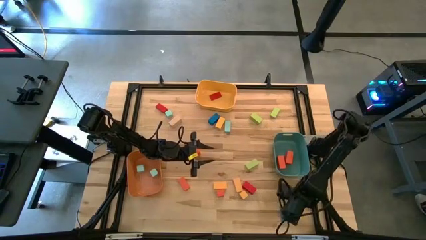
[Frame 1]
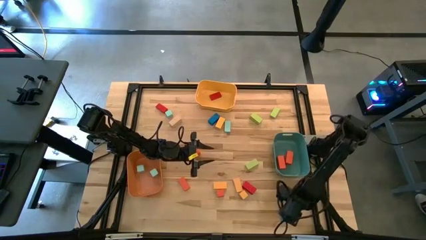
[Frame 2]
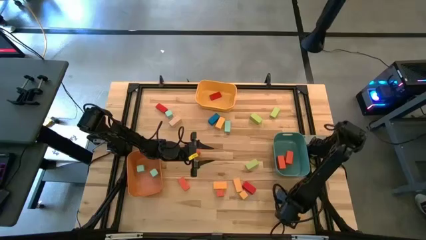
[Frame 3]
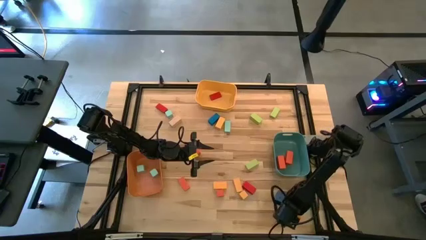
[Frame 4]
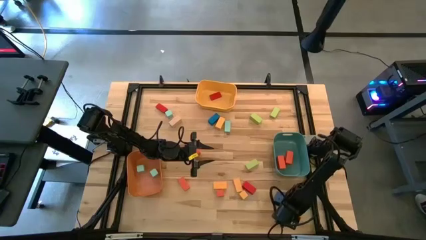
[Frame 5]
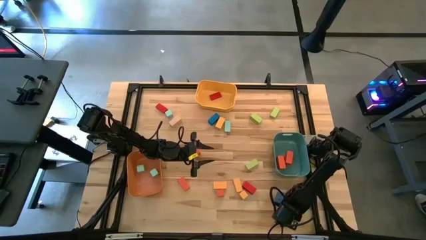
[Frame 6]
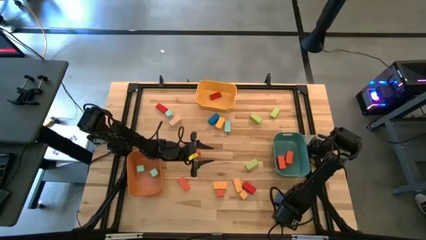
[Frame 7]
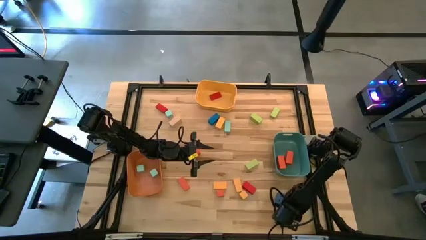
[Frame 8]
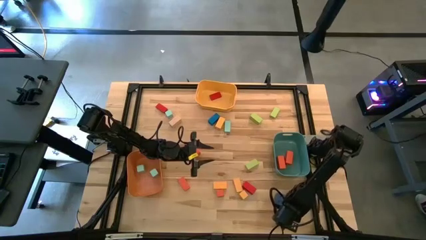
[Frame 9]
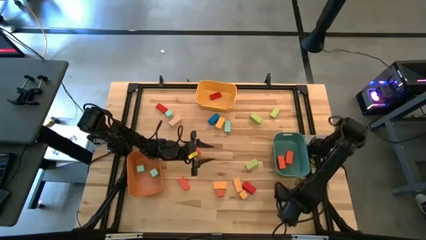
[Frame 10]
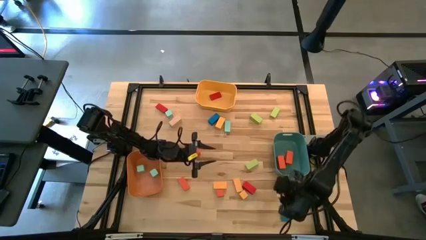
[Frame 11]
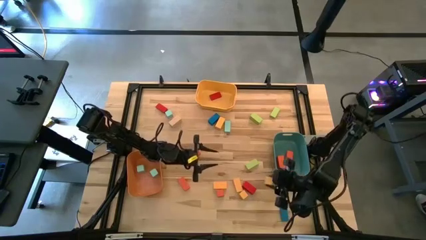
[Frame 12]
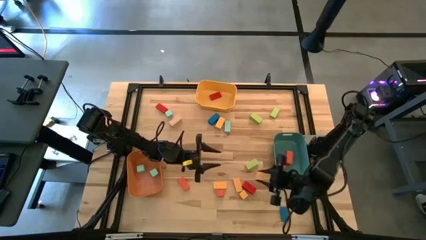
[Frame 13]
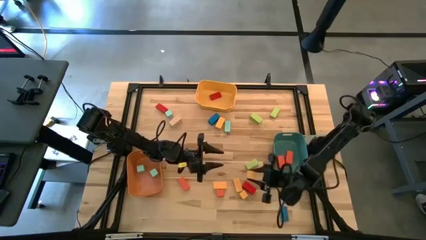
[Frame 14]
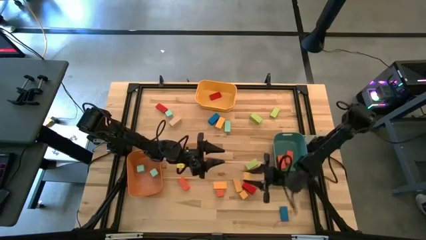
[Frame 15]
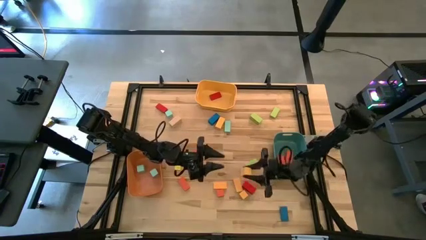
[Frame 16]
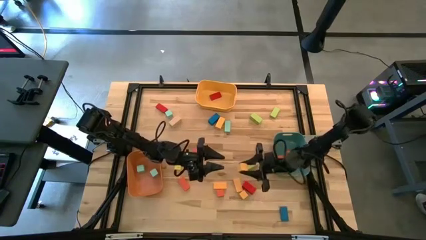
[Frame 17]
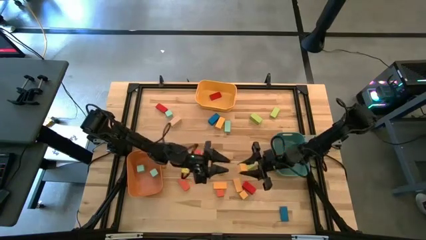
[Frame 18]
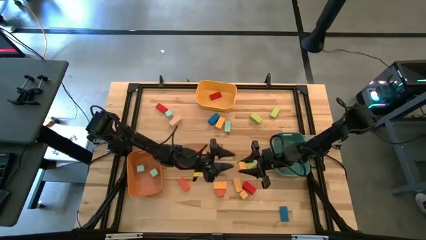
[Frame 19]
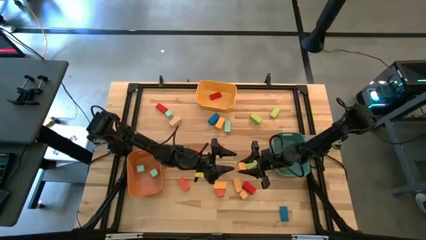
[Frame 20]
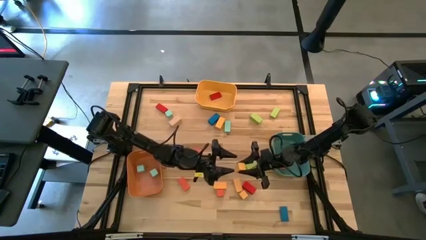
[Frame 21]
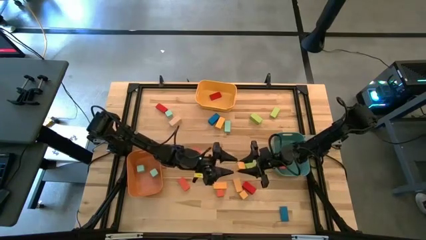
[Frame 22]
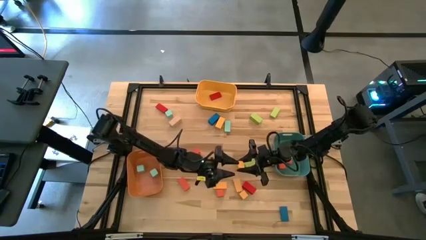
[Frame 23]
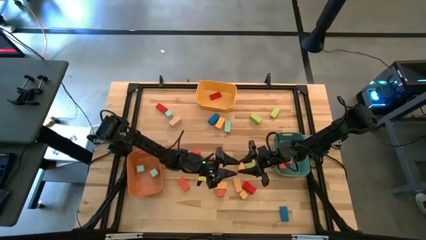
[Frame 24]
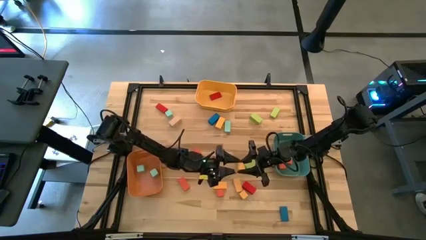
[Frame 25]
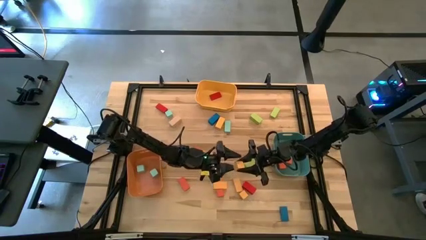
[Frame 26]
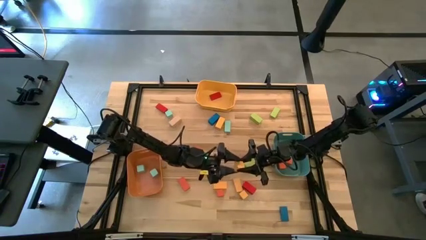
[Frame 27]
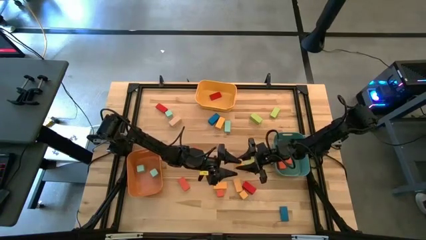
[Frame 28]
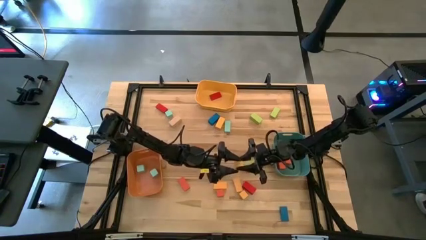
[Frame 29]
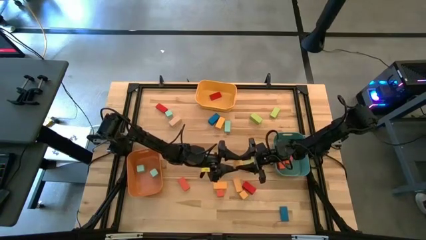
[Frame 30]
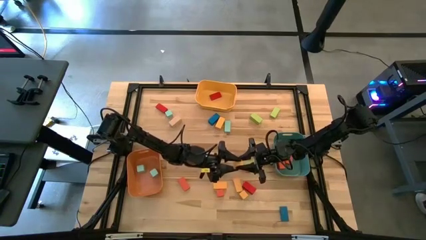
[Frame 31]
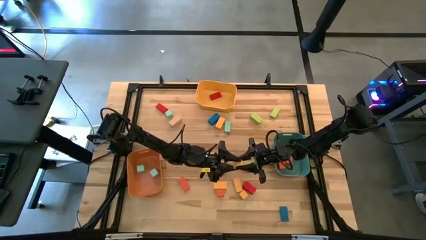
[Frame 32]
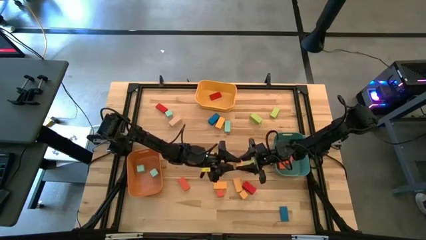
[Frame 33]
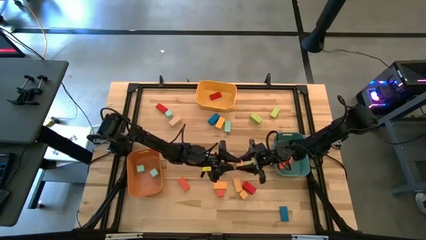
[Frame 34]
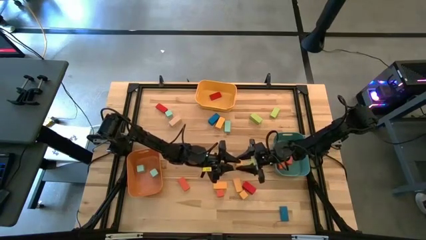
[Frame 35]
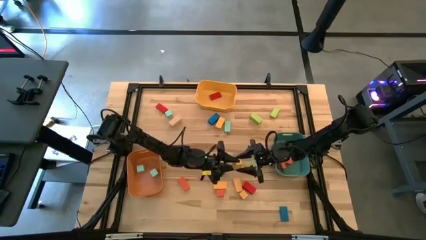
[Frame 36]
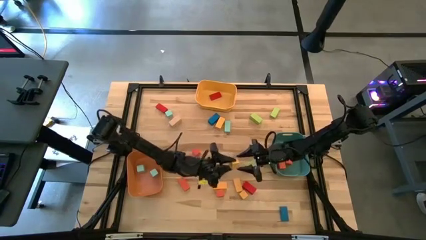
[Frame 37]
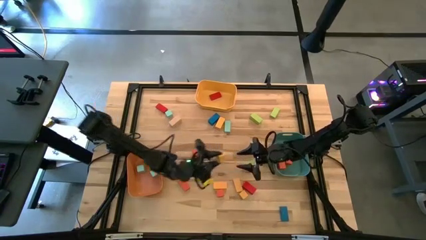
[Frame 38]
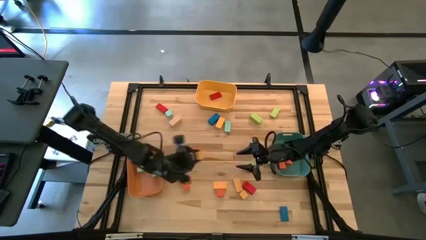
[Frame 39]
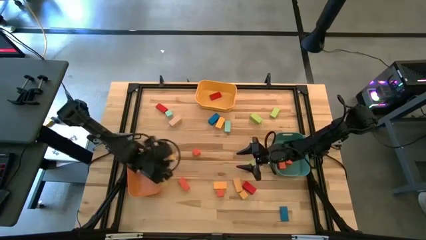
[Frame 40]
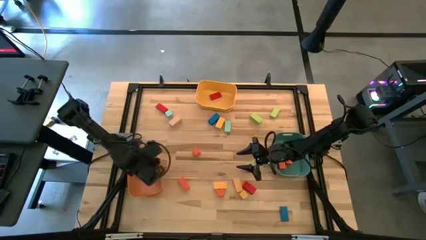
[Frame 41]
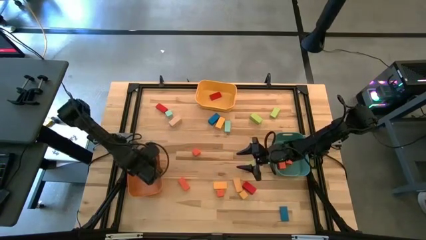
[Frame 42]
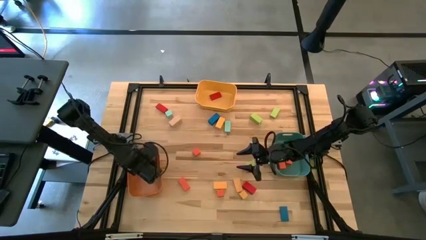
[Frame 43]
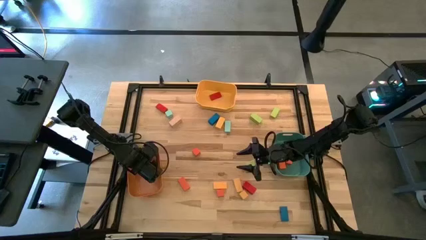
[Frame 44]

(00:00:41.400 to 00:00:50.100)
Task: Sort blocks by size
Put the yellow square block into the orange bin

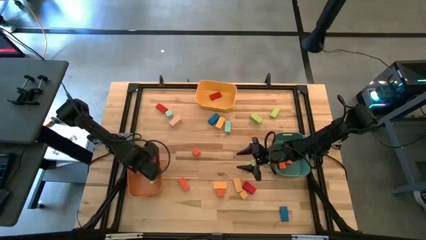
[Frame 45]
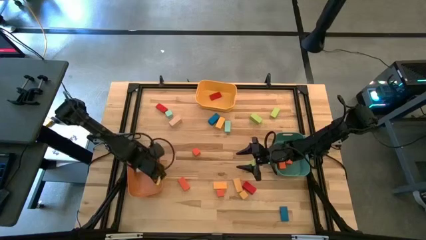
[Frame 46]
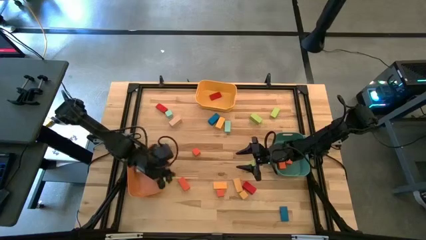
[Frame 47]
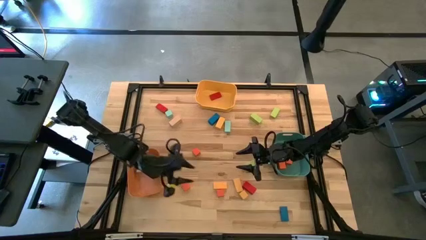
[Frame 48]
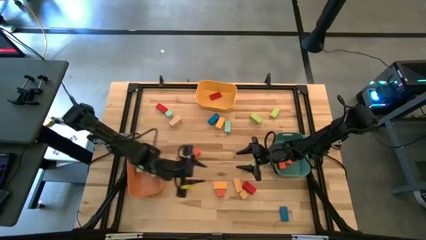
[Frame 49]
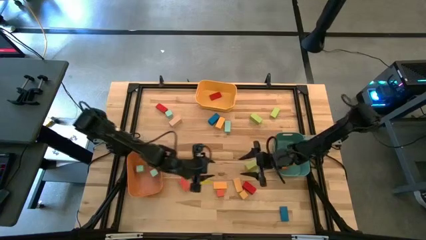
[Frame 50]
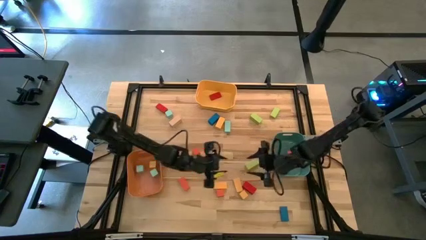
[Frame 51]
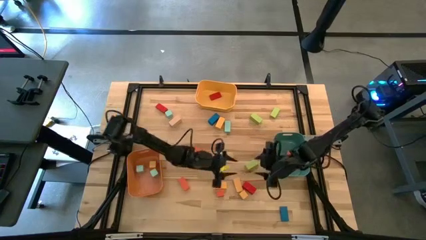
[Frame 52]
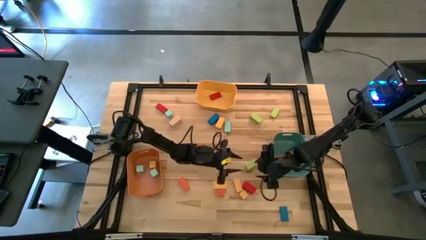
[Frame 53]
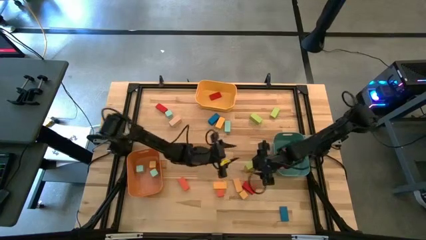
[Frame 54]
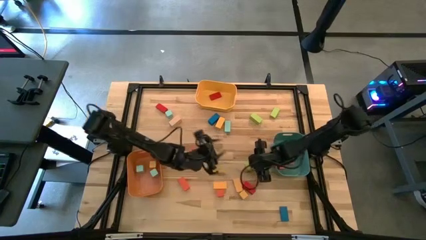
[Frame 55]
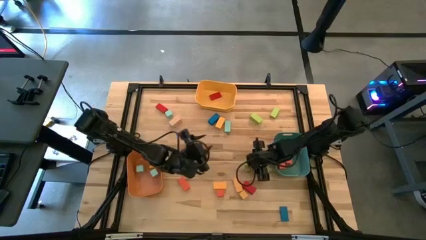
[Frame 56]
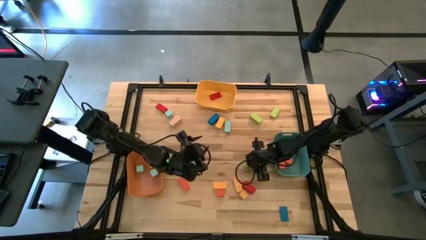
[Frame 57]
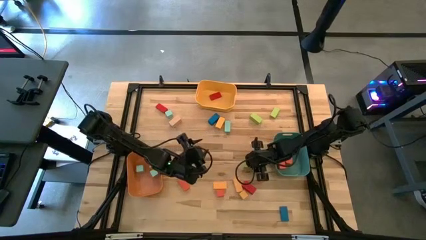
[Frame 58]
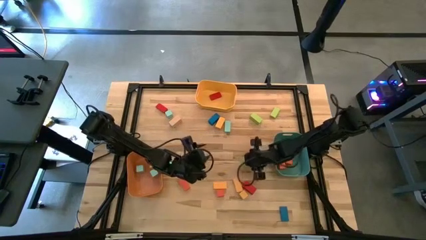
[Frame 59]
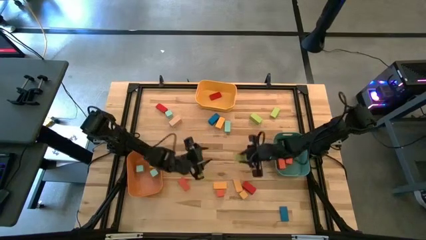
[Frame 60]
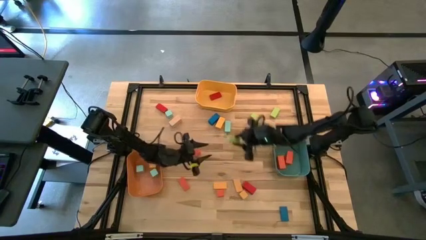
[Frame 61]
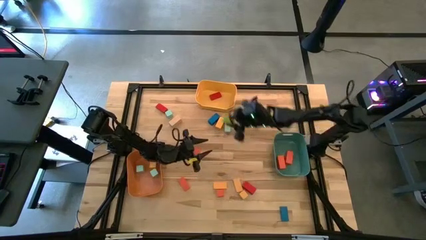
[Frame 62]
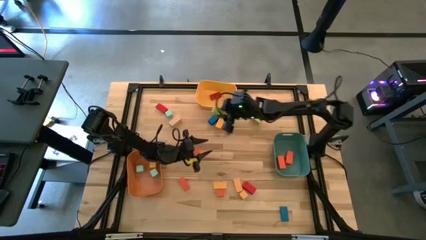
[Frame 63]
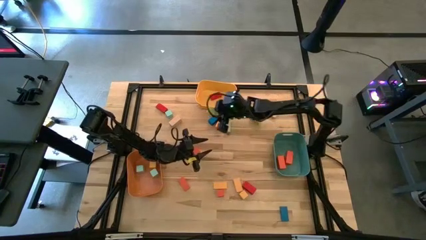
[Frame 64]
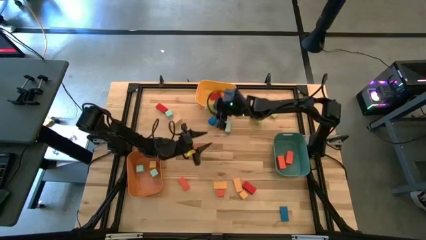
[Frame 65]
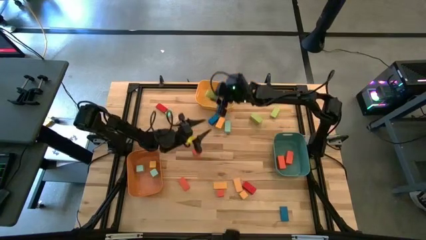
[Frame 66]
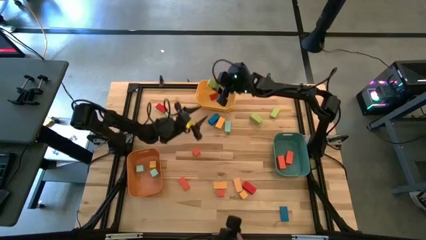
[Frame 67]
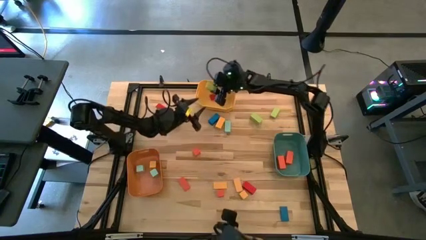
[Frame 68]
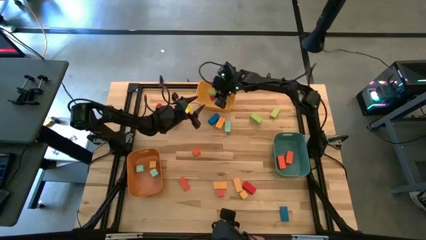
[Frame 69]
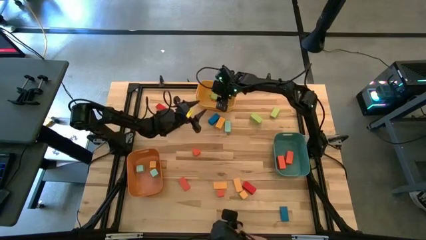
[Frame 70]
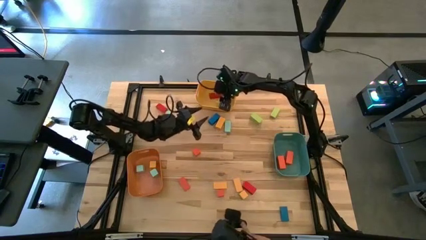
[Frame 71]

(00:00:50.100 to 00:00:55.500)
Put the thin green rectangular block into the yellow bin

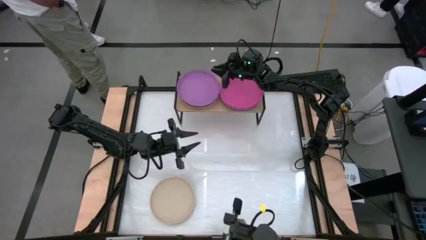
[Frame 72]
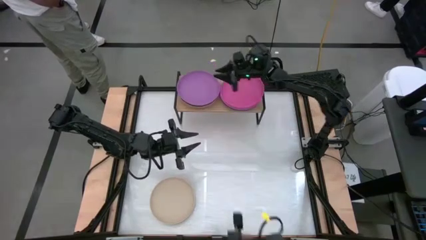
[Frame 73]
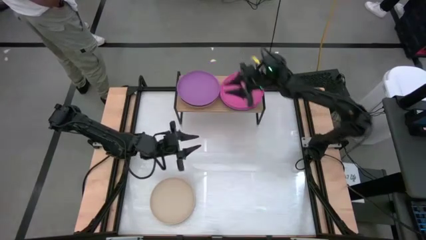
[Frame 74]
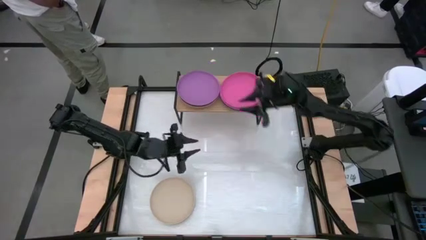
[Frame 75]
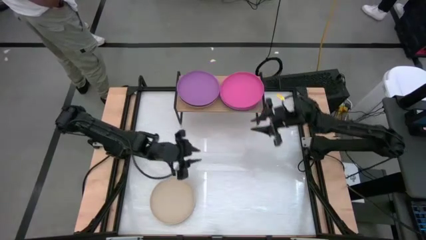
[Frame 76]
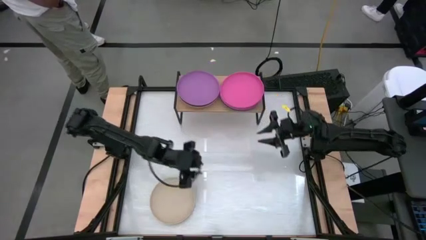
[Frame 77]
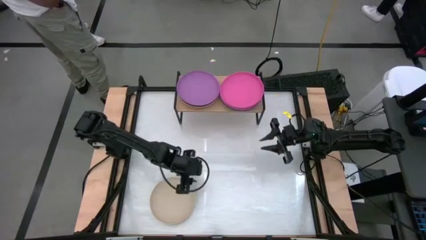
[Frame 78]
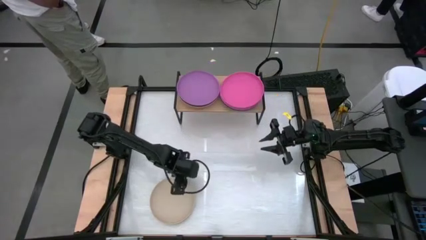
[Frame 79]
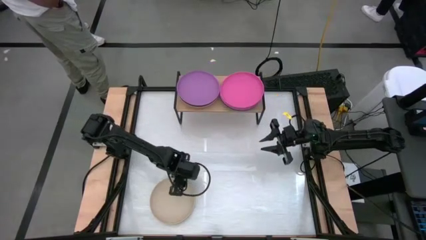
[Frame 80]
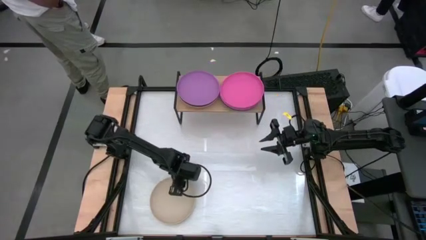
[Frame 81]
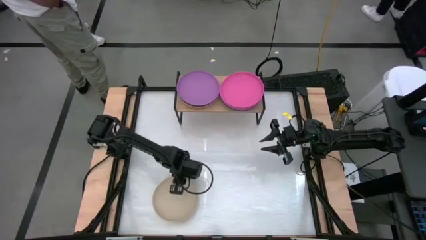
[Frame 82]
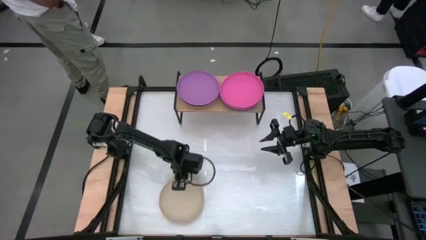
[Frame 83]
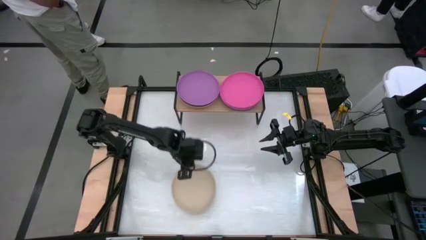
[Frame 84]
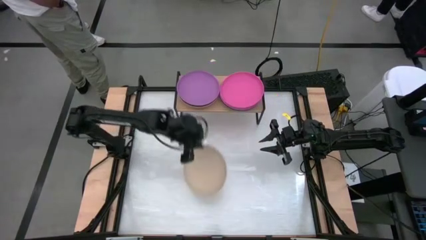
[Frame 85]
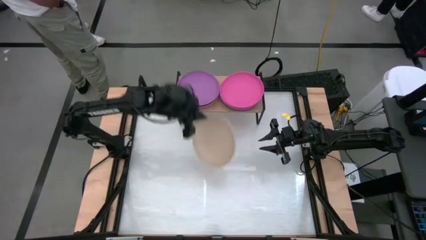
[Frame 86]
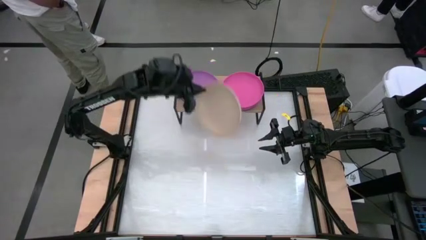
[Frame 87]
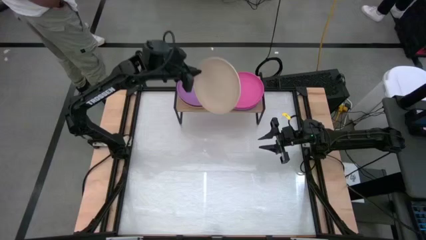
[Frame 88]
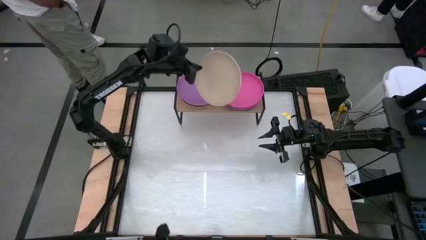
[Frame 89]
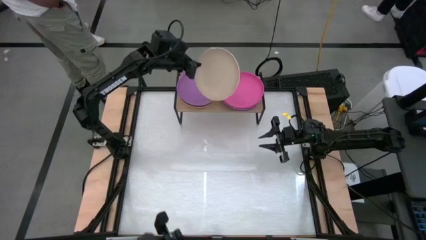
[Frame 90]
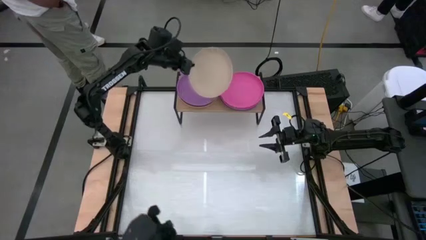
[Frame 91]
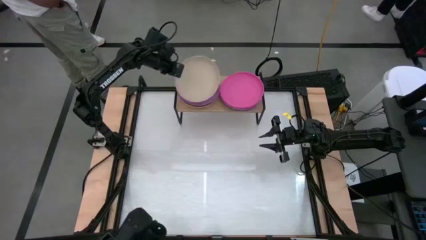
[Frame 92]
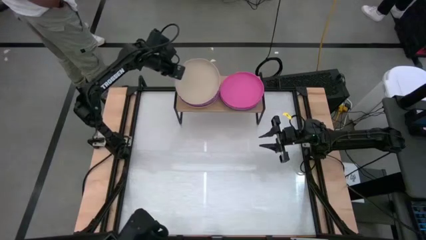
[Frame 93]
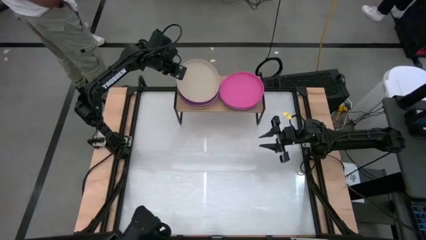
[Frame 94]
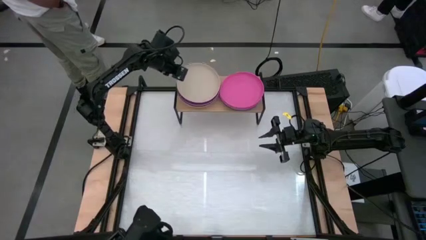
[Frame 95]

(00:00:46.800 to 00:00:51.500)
Task: Place and stack plates onto a shelf
Stack the light brown plate on top of the purple plate on the shelf
